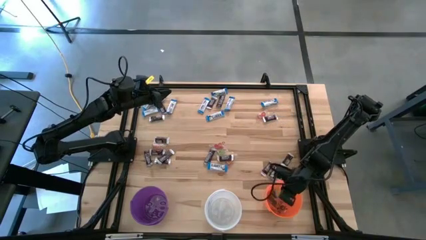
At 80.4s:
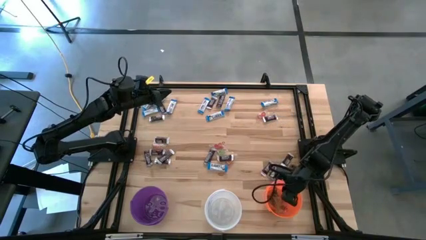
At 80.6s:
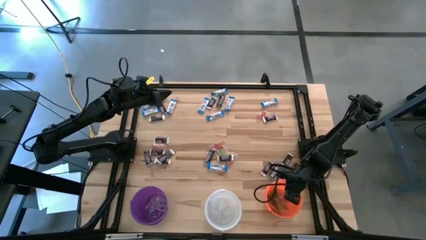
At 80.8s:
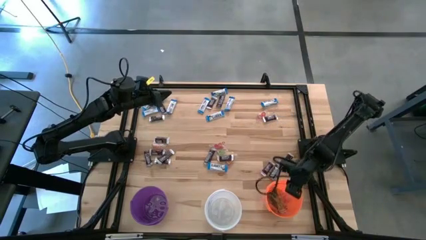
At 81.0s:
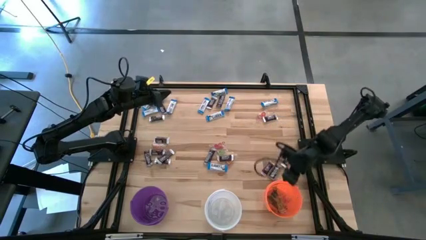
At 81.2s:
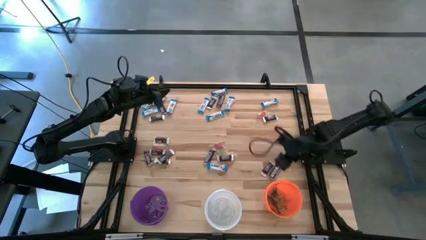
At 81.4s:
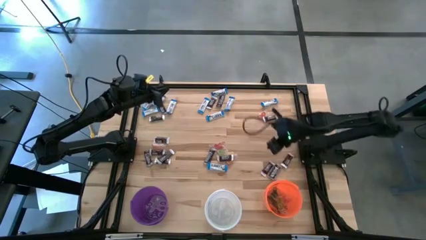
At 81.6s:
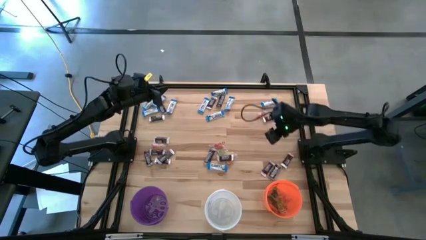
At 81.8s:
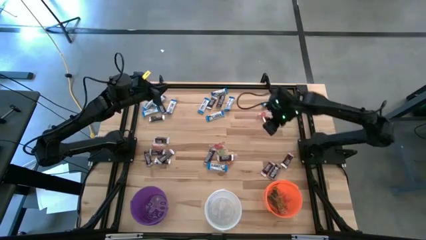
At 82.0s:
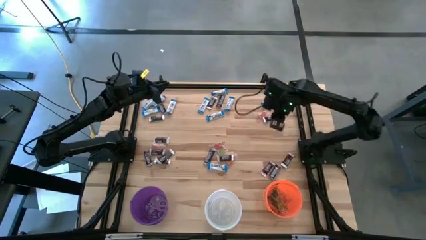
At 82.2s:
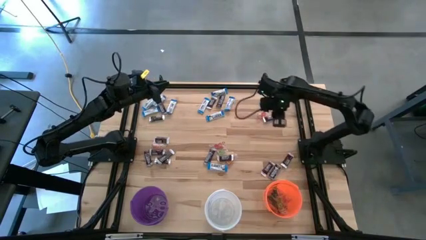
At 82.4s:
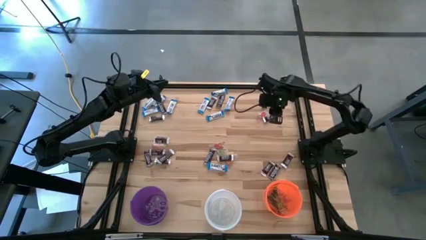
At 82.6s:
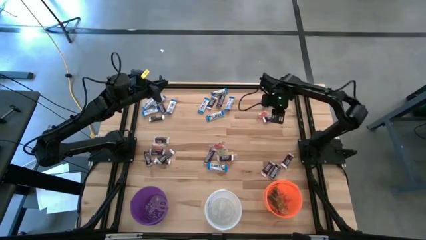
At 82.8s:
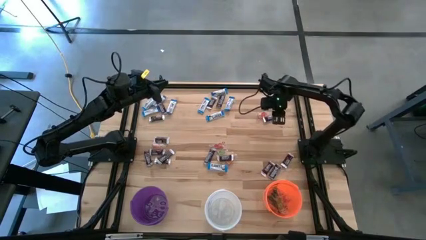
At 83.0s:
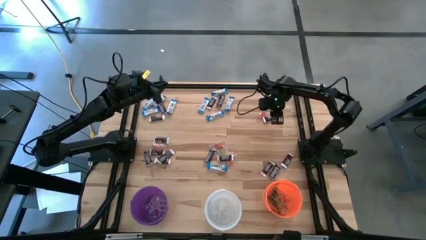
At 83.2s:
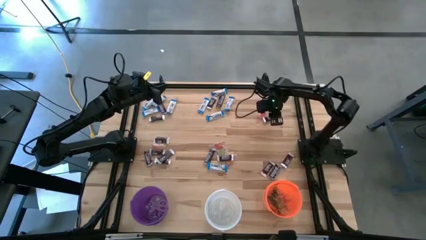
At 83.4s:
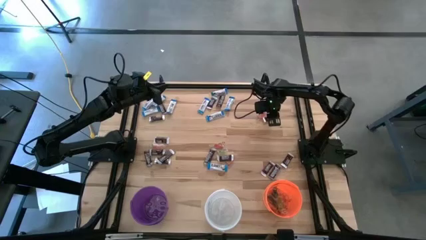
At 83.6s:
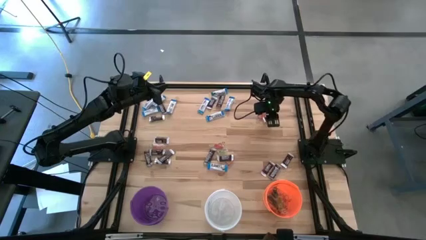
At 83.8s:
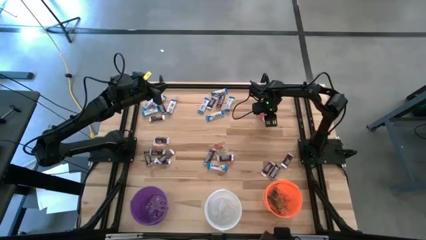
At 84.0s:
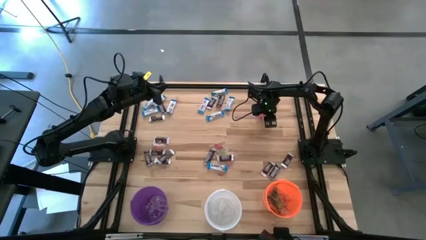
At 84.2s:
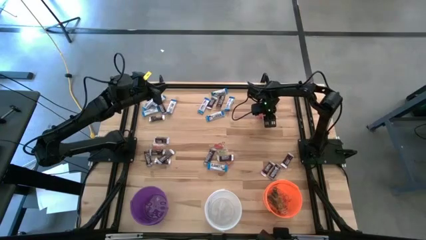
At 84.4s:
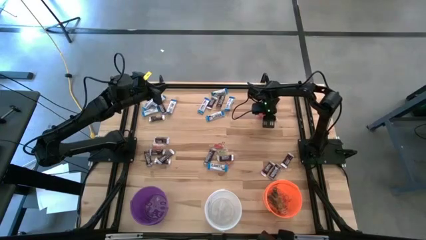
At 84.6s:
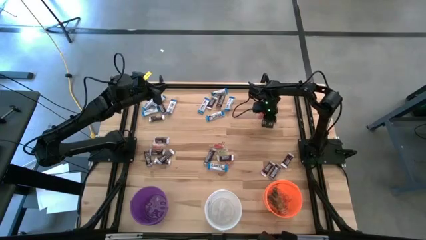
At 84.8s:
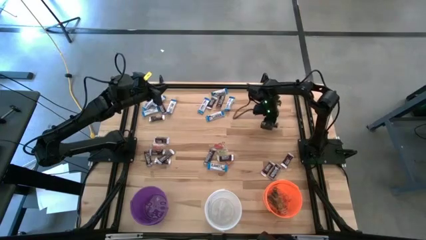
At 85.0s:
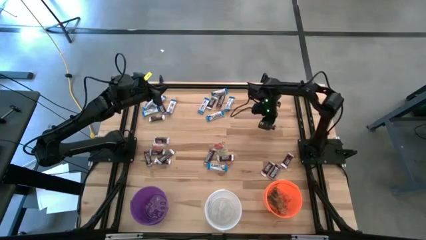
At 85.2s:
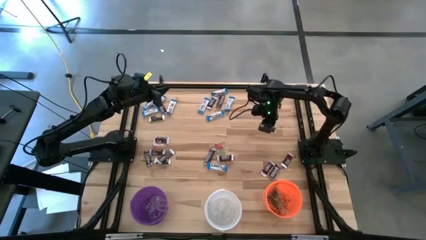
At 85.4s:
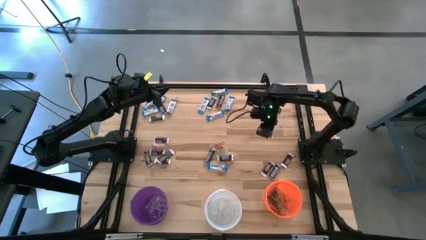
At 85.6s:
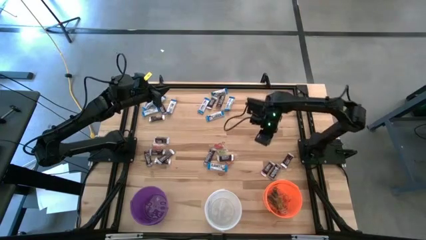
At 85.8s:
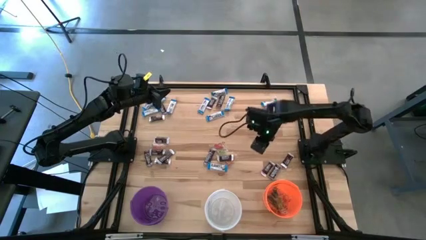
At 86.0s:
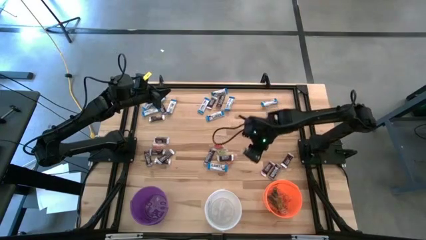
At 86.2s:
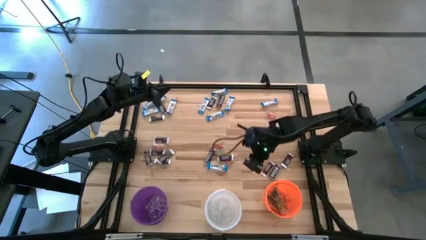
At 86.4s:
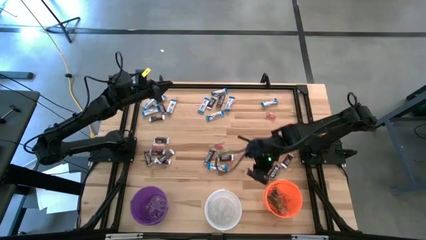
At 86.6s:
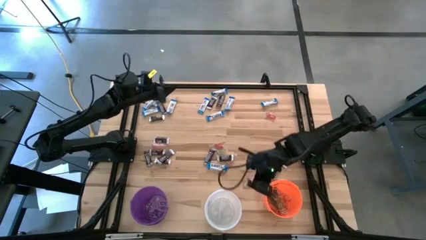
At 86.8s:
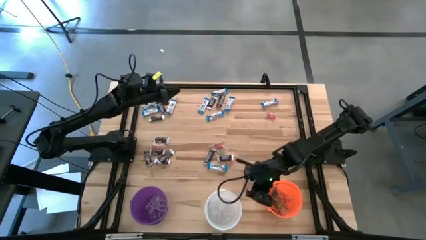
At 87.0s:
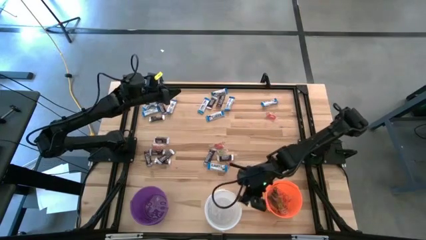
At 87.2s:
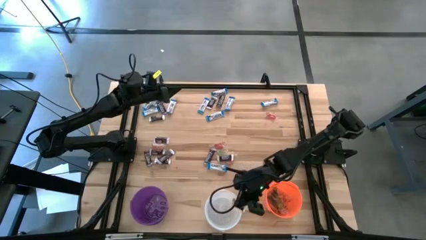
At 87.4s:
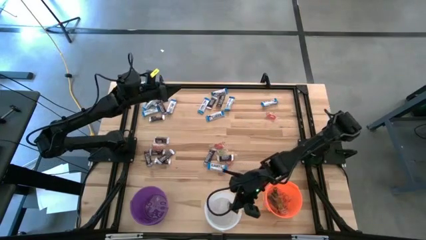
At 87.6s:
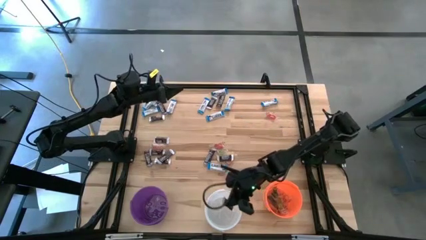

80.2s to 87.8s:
Task: Sort candy
Put the right brown chocolate into the white bucket

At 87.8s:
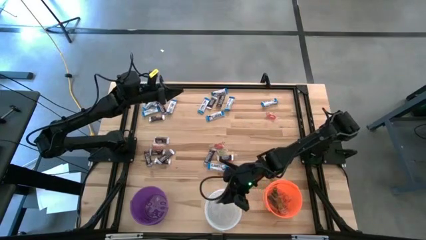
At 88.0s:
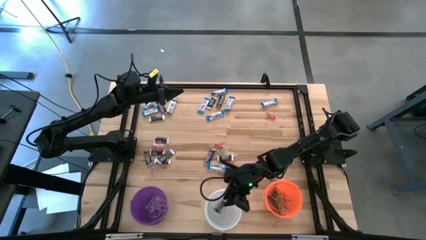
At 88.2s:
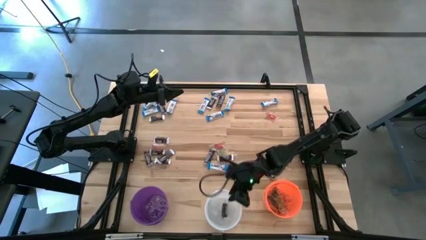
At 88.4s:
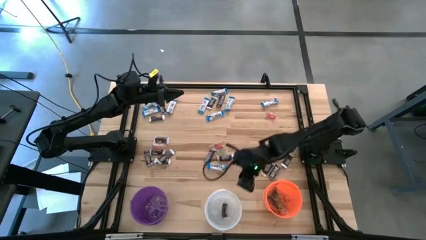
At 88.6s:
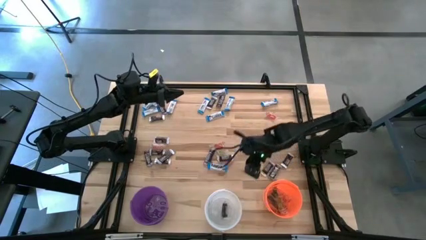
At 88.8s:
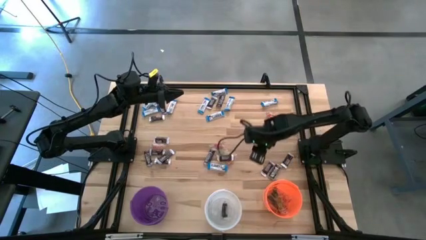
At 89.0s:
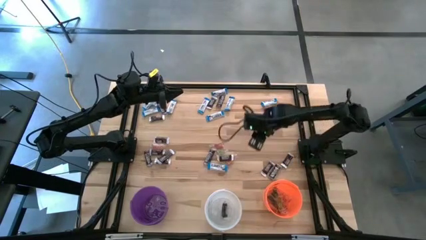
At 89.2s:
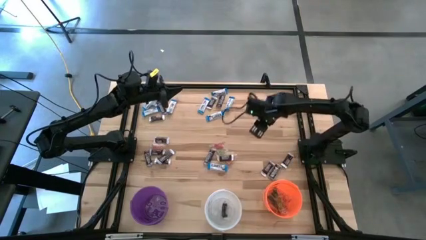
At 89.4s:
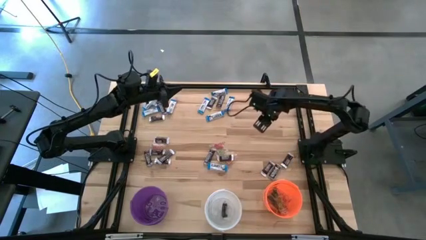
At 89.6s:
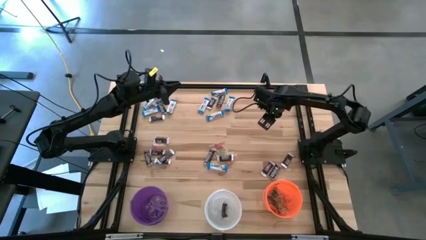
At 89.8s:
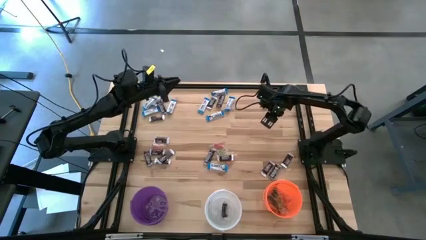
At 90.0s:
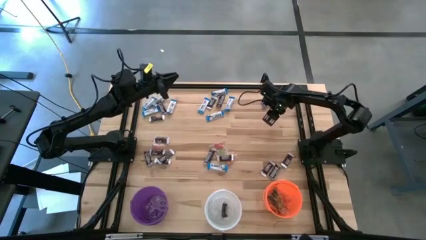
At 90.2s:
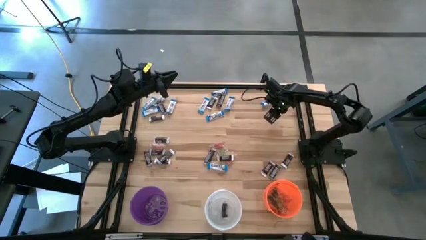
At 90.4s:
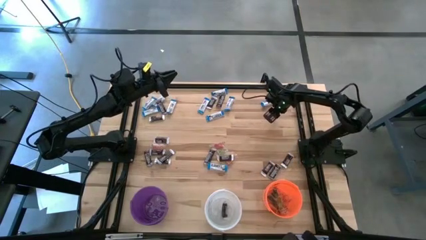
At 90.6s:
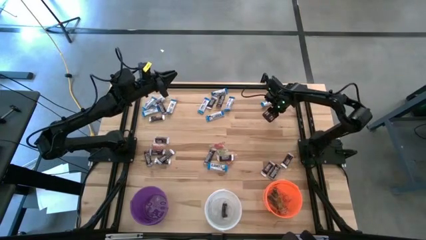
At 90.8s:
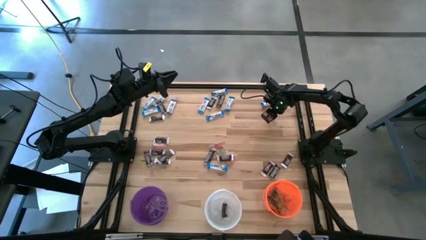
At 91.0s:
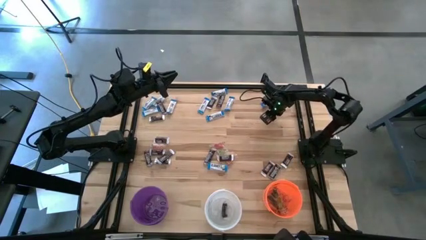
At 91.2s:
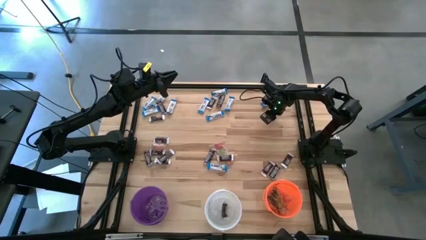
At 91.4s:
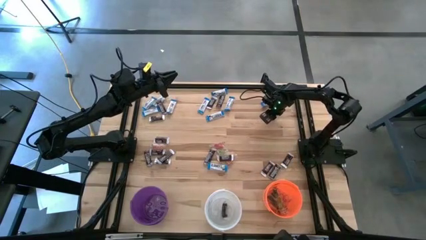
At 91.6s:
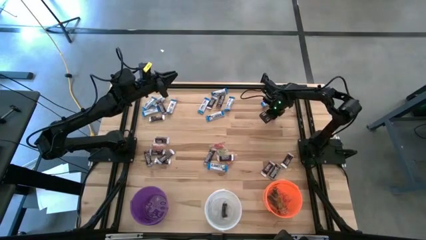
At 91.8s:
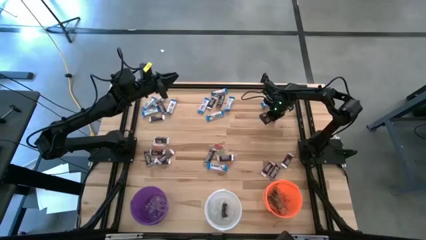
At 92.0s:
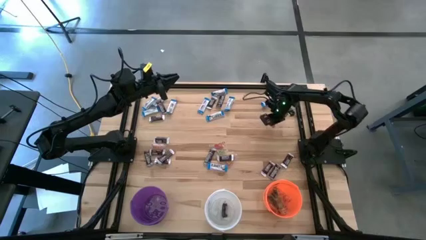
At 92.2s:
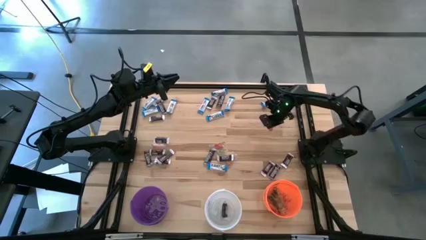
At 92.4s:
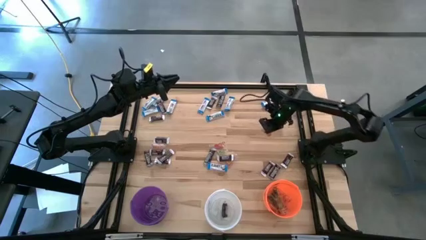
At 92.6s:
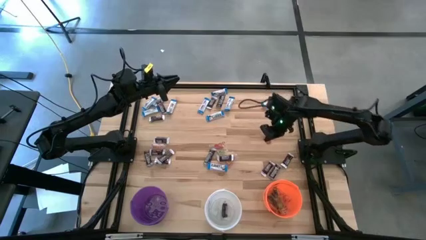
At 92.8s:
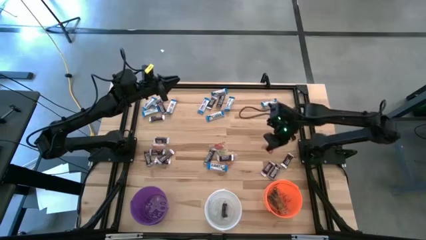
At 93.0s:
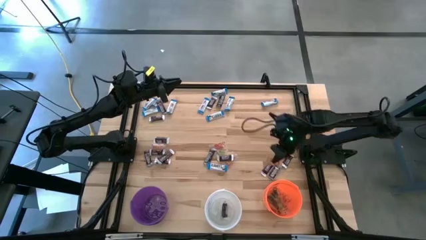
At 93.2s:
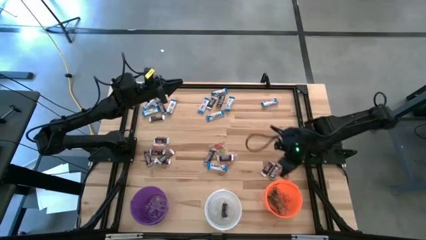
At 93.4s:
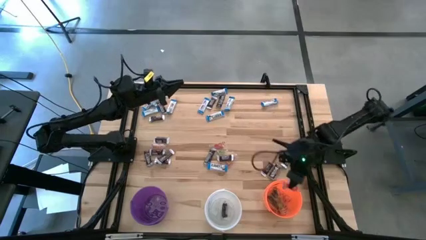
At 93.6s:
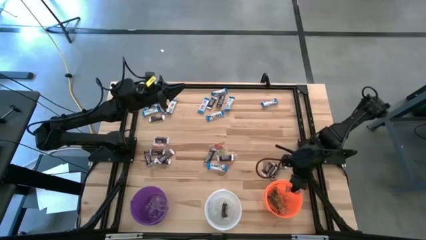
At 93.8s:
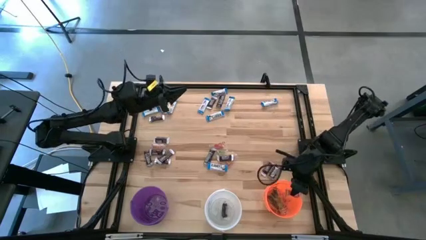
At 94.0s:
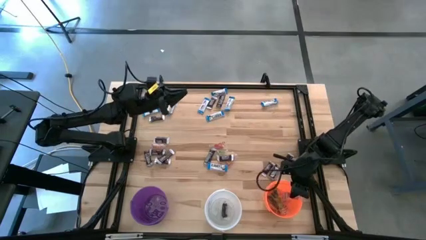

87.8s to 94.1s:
Put the orange gummy into the orange bucket

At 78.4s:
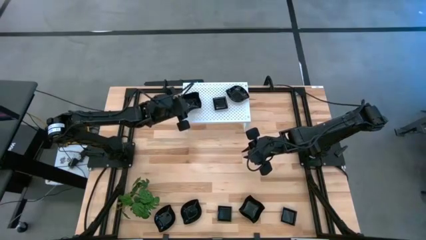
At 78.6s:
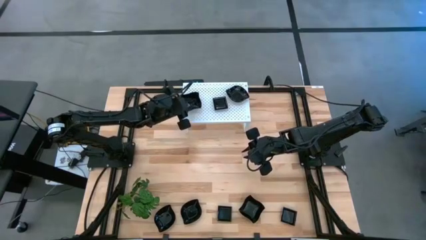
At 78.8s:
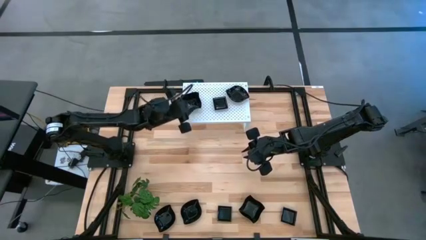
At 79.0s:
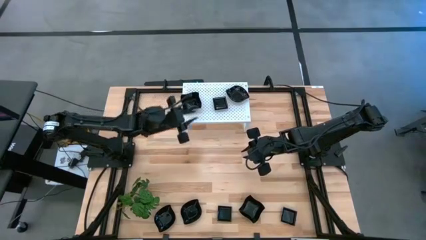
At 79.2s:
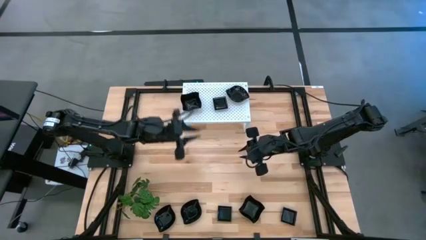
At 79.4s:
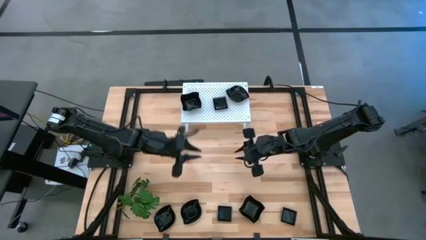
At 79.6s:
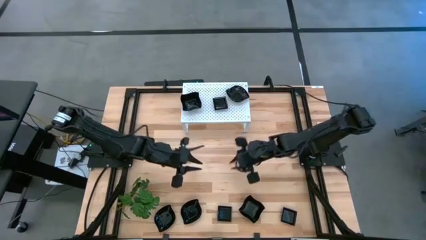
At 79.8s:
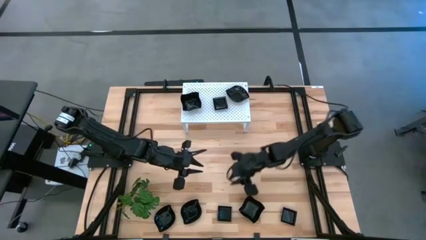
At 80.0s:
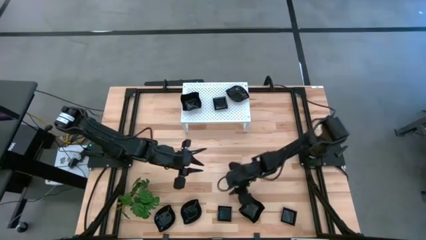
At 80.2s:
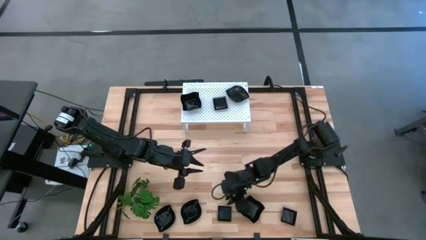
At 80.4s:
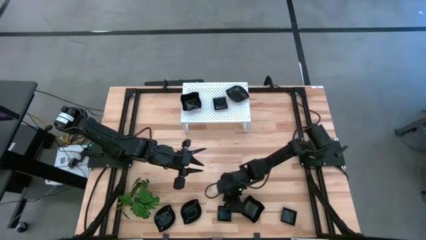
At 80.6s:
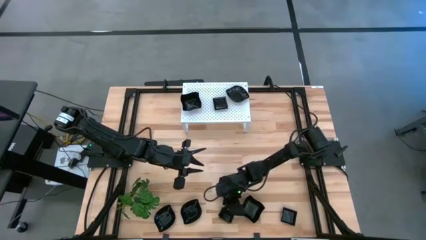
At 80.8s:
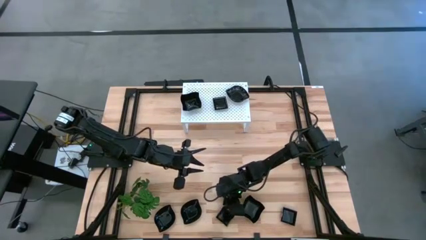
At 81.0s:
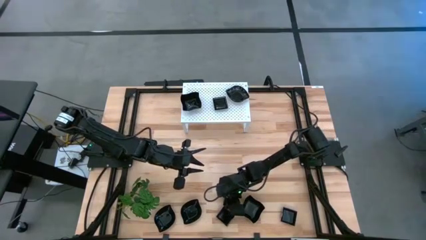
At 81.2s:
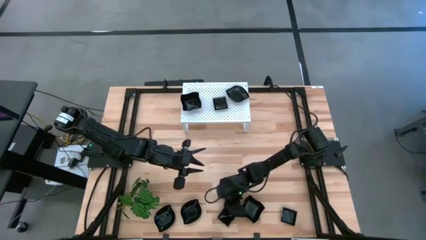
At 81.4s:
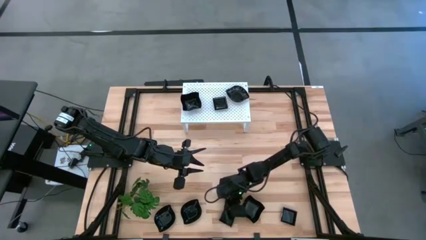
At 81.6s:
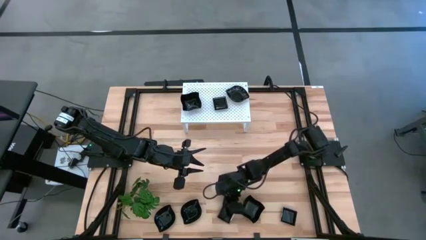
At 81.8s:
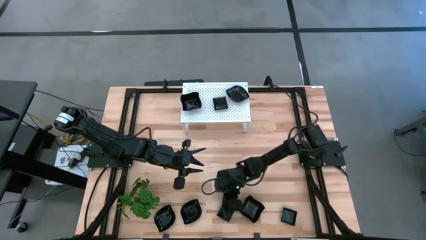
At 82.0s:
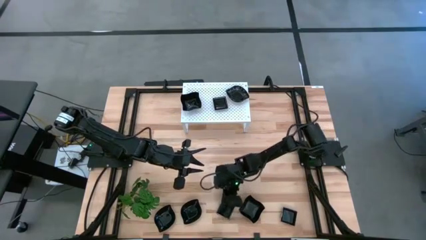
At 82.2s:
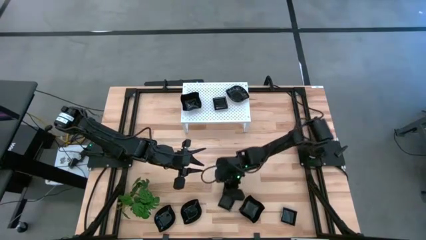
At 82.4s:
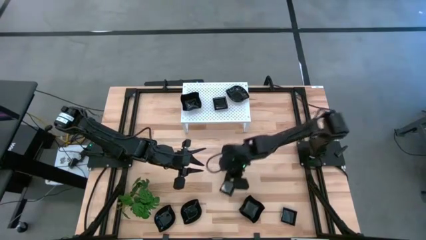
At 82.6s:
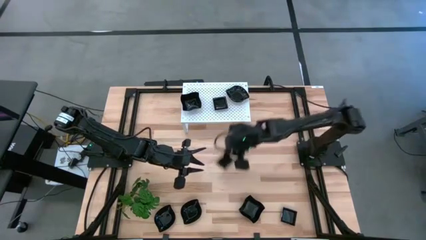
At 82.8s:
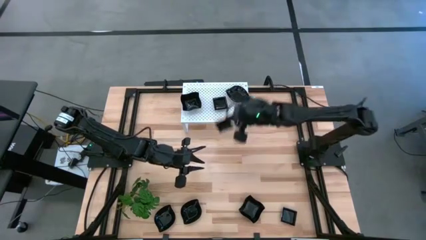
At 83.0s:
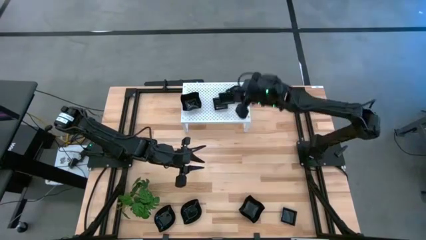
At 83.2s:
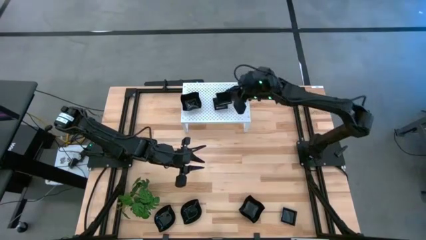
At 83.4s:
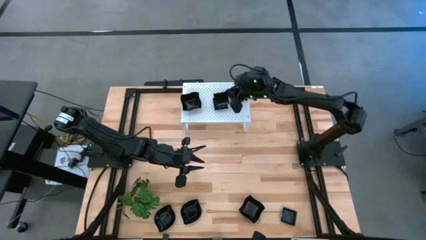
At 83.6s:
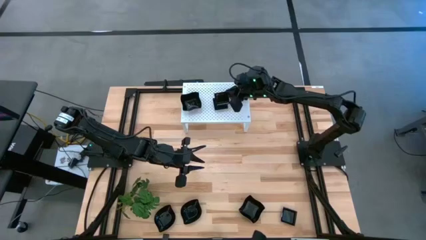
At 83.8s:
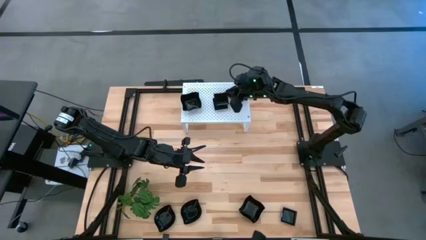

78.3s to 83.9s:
Task: Pick & Place Mini shaped plates
Stack the square plate on top of the other square plates on the shelf
